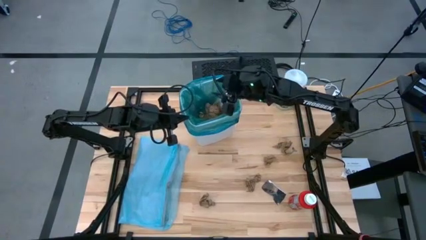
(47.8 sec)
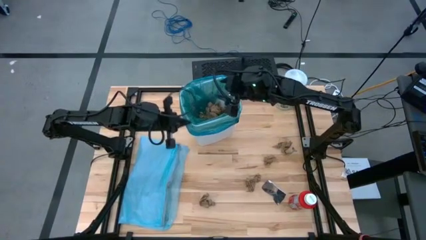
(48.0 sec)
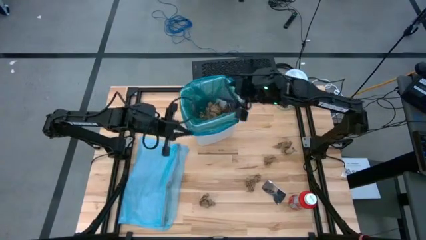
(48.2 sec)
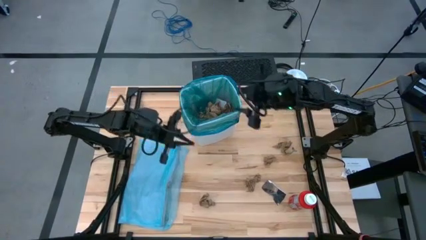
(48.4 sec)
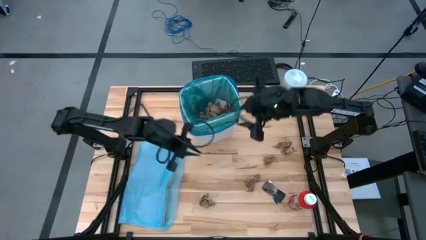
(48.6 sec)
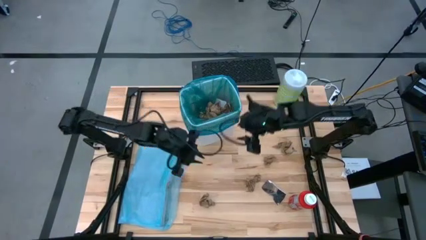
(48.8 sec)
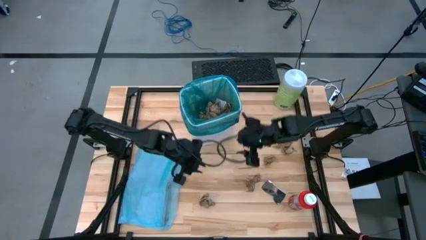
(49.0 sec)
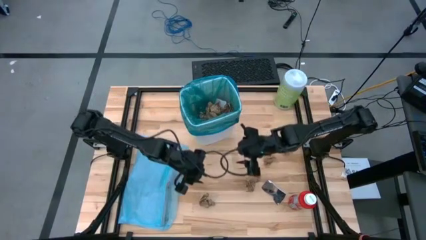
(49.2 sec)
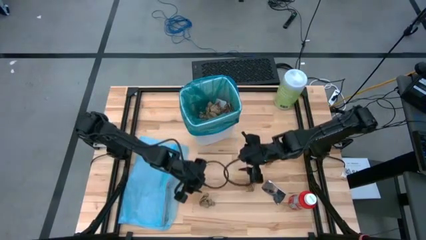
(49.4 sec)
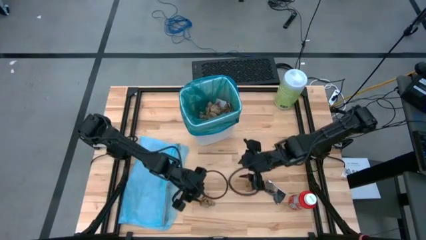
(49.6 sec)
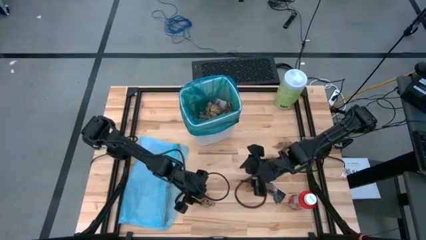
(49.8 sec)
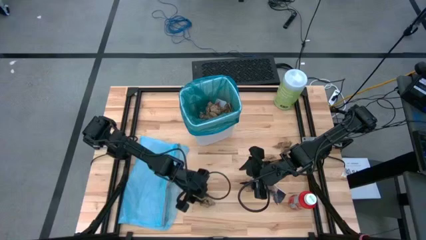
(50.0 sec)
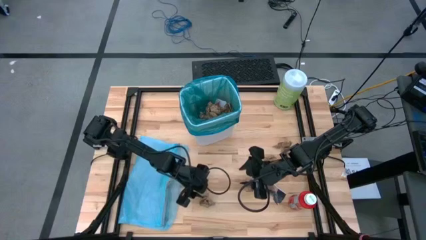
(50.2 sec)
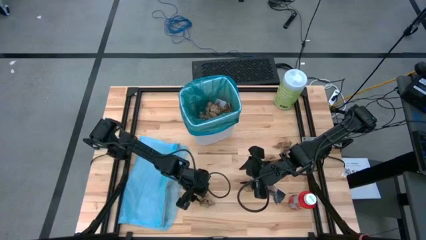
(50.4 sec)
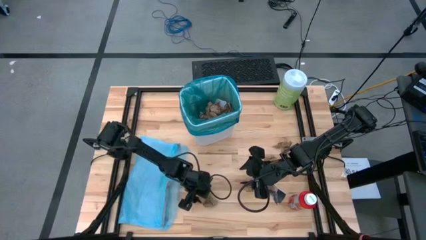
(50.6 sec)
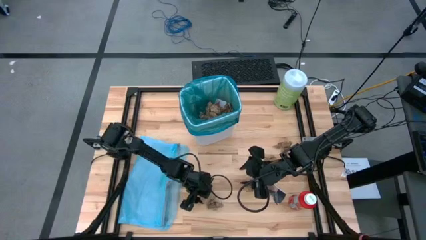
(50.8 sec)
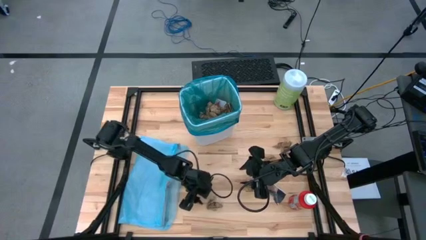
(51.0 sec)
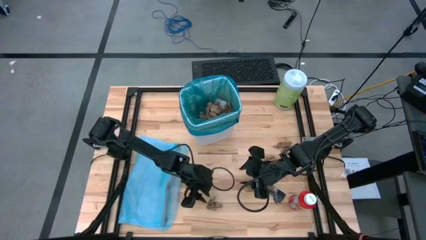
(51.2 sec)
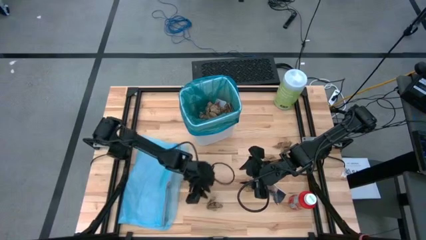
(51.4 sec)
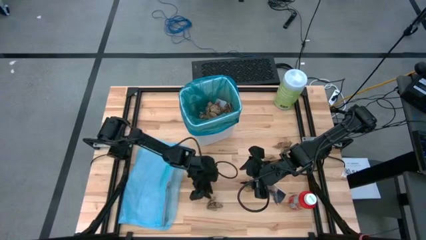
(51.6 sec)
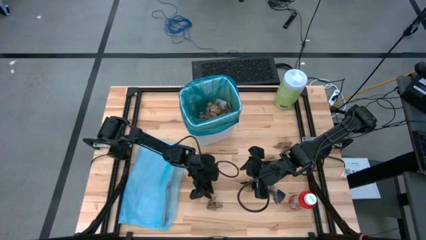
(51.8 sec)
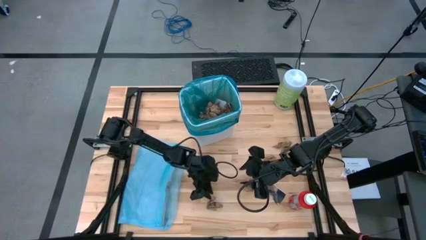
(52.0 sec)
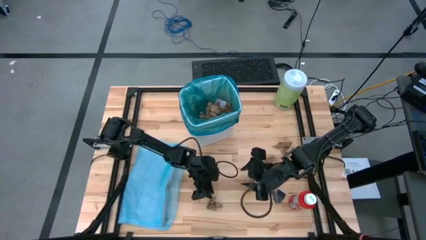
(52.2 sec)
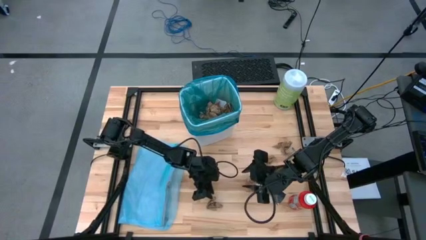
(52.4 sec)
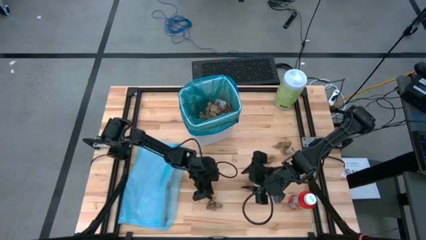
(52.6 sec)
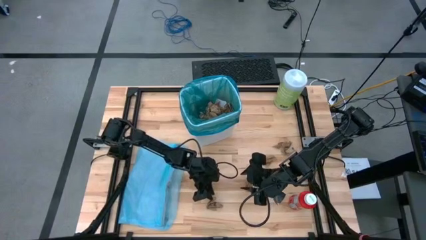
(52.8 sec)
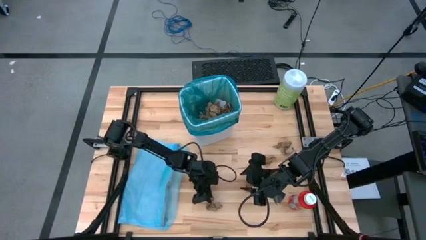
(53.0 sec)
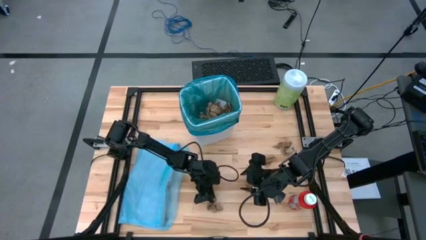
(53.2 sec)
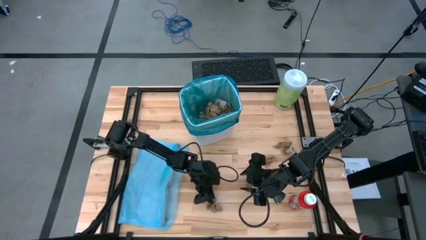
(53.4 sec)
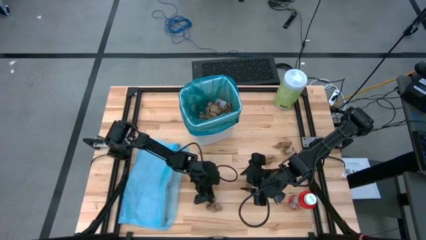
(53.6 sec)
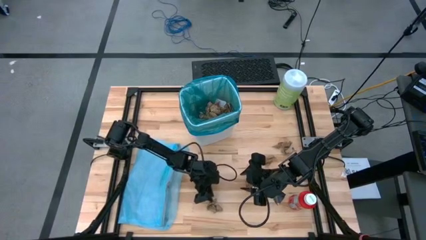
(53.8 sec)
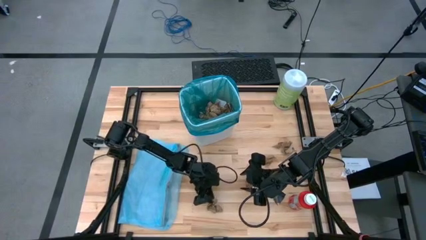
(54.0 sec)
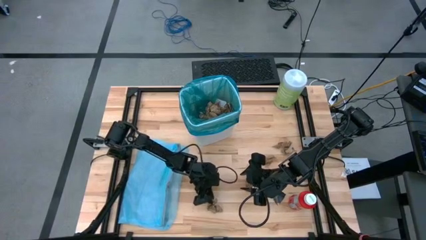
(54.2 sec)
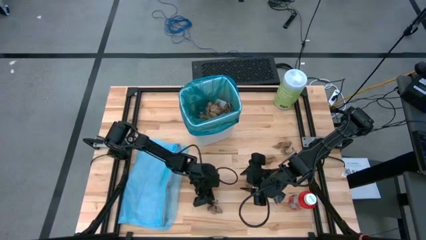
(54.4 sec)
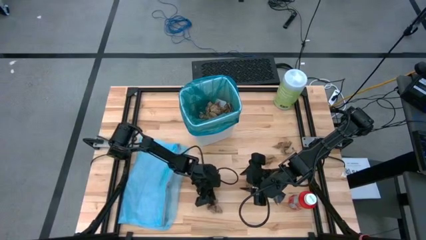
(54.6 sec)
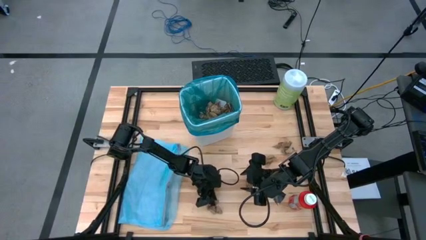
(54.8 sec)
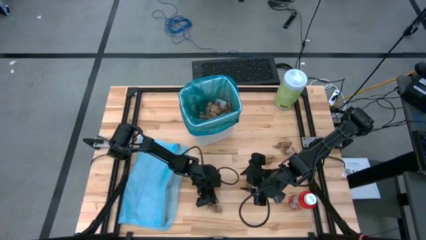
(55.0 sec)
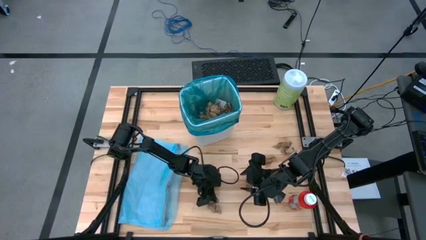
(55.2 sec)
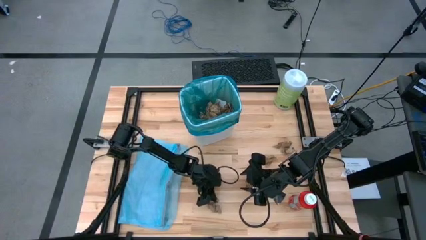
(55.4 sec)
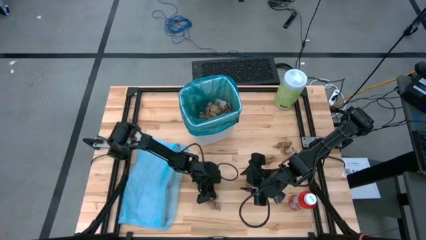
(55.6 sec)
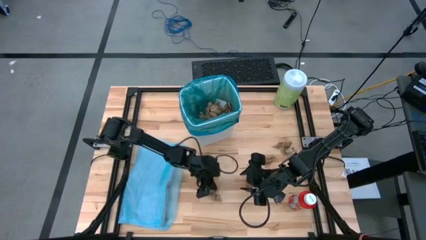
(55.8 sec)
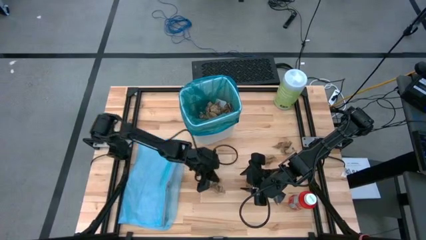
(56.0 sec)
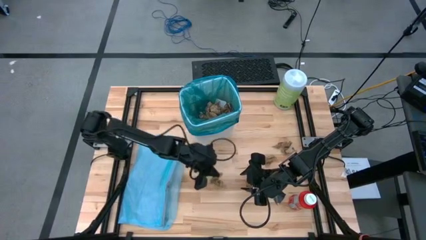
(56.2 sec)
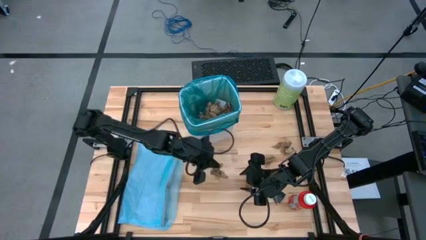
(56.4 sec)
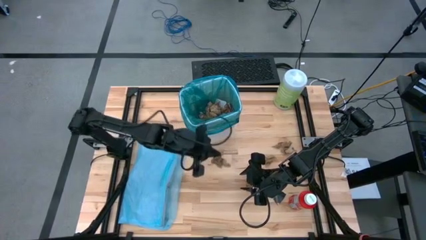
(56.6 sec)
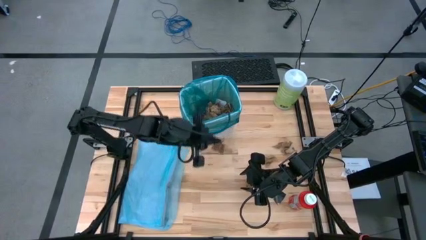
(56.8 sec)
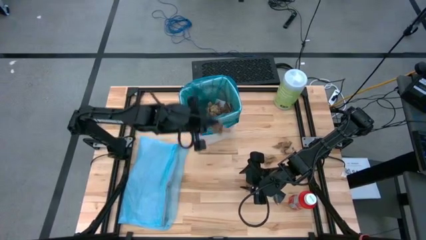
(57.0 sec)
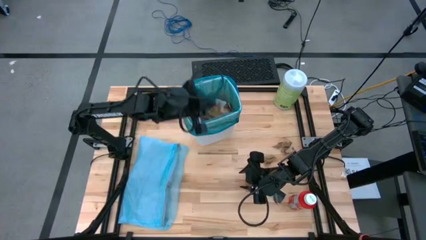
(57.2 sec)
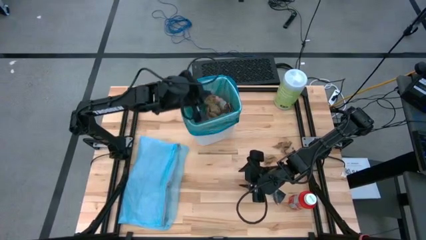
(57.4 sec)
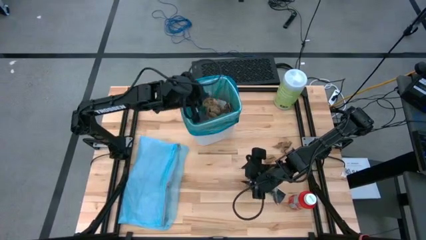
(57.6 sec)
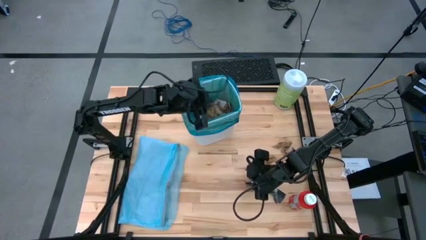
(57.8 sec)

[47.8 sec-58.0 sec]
Task: place trash/remove bag and relplace
Put the brown paper into the blue trash bag inside the white trash bin

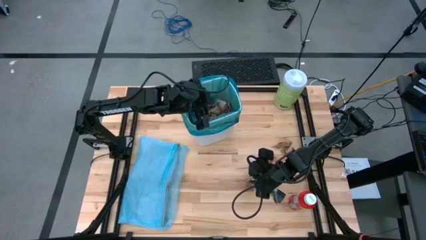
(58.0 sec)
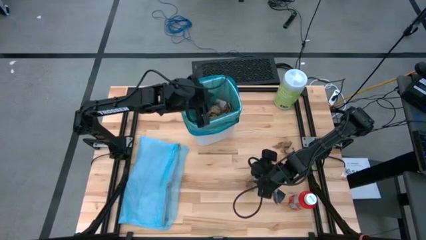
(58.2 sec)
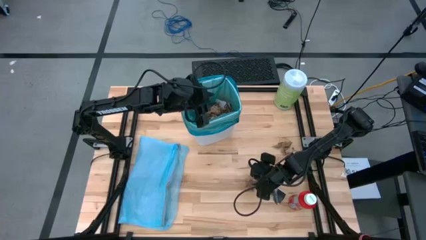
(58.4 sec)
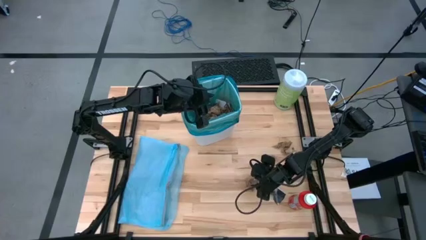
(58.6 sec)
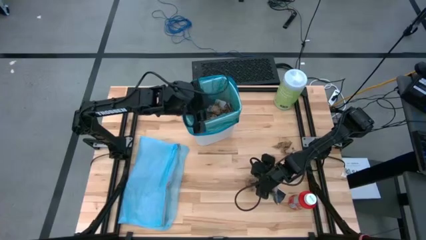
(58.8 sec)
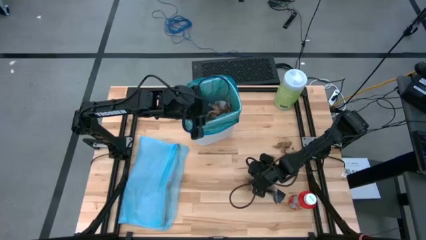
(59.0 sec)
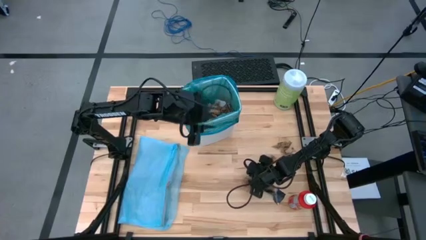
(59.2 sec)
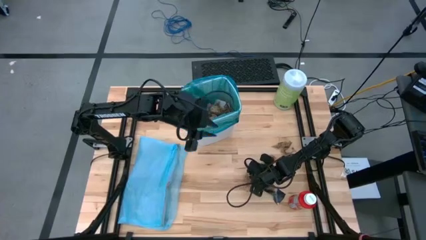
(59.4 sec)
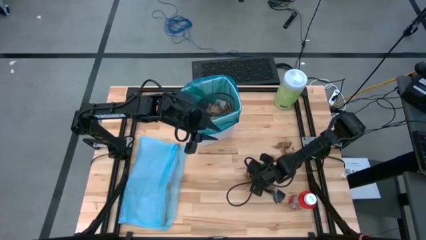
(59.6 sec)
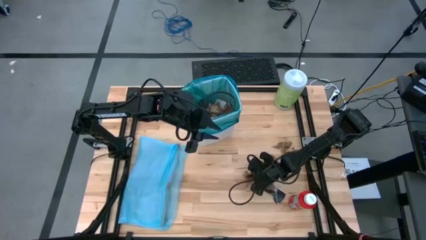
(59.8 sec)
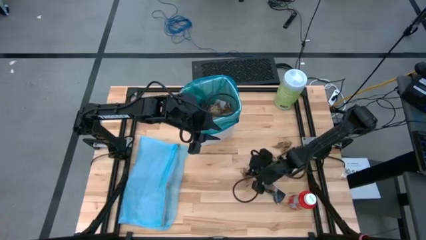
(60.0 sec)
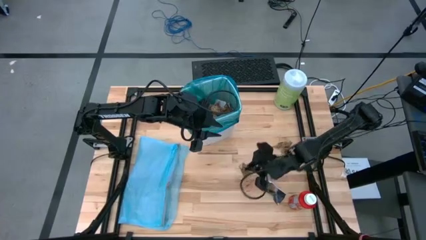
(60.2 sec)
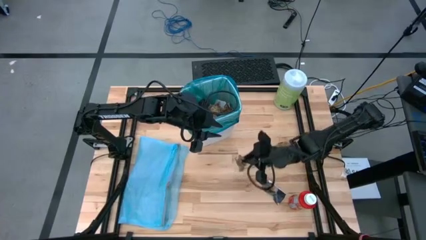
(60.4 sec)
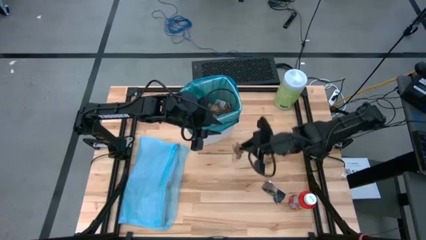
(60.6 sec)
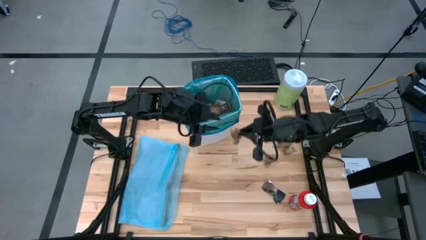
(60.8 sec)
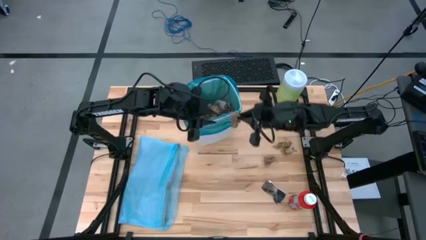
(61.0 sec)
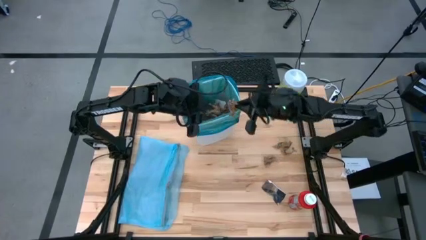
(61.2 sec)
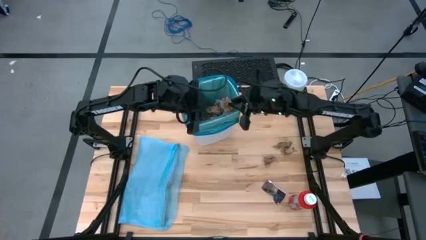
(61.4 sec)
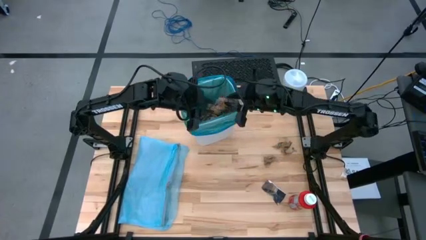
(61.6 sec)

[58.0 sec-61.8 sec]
Put the brown paper into the blue trash bag inside the white trash bin

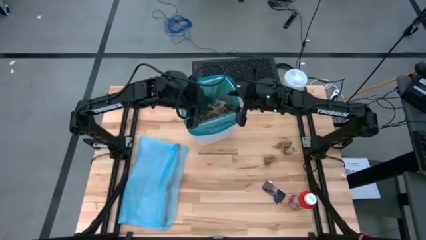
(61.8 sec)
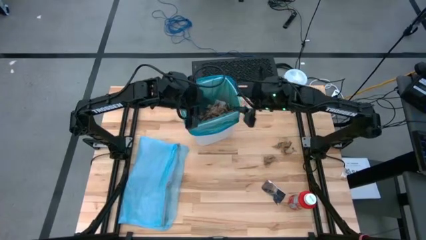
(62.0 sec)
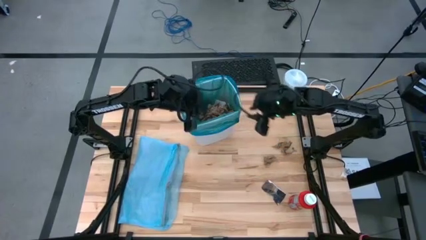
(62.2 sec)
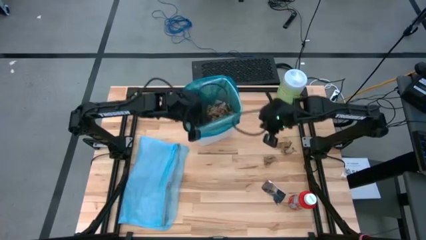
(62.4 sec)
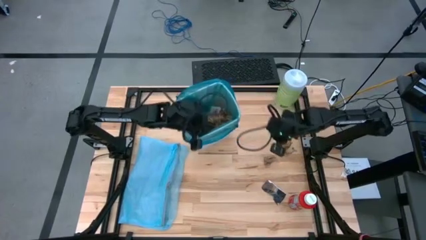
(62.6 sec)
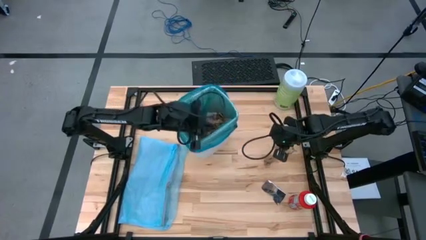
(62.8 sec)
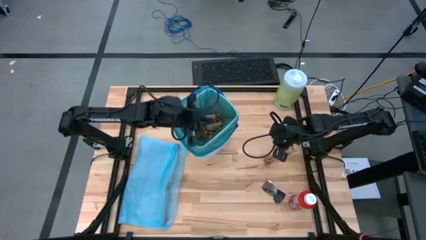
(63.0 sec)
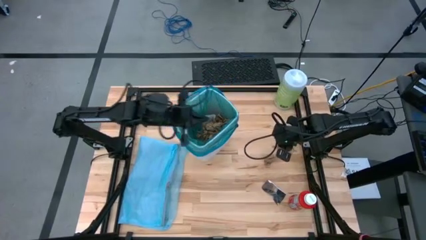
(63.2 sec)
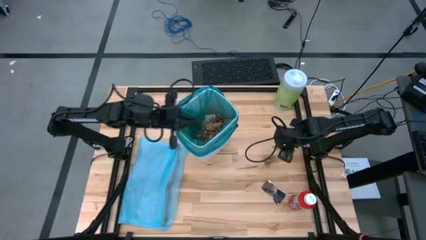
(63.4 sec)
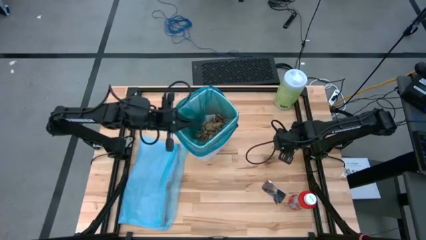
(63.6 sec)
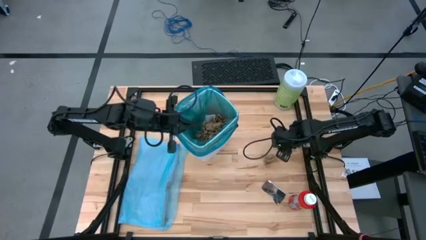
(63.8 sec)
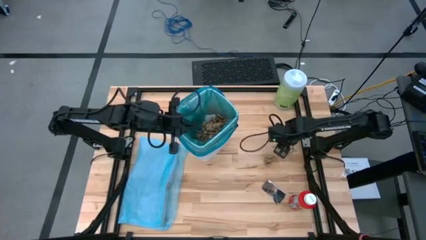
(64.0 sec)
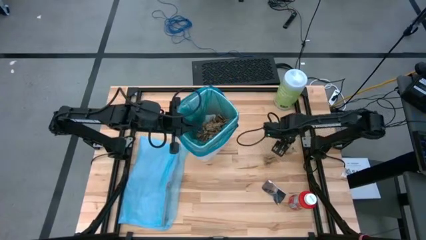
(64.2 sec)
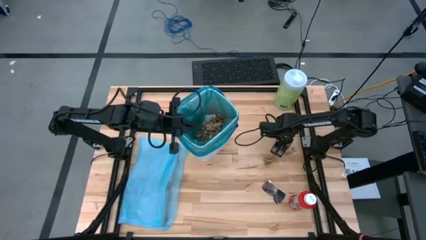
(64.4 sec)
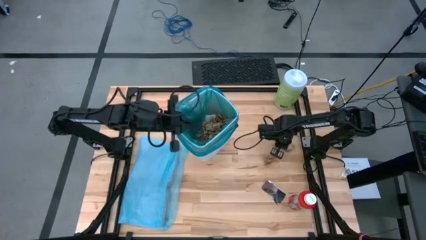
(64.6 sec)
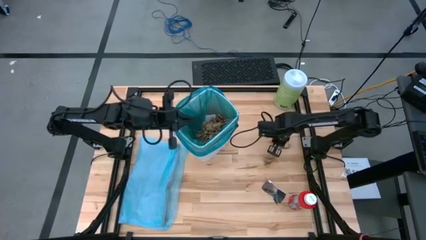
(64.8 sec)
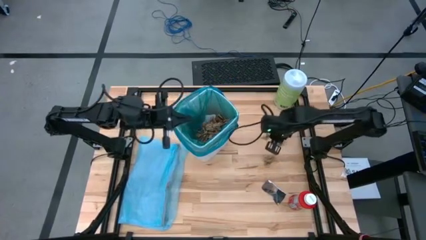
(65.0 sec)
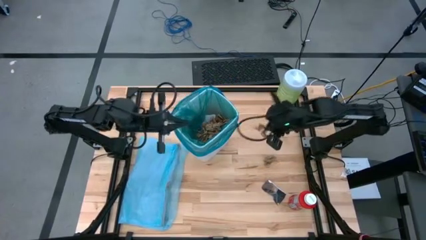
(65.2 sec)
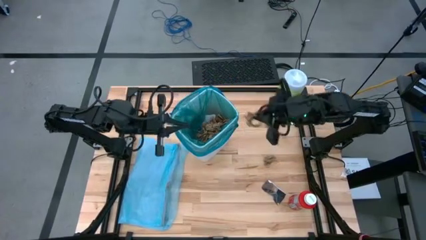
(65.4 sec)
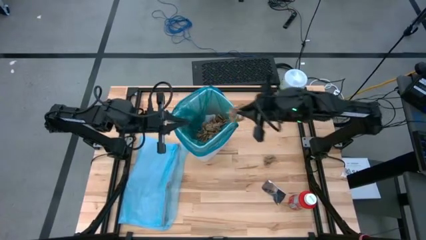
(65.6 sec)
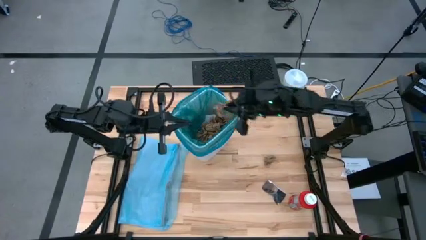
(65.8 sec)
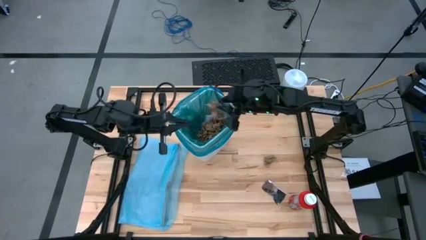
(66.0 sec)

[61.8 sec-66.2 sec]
Put the brown paper into the blue trash bag inside the white trash bin
